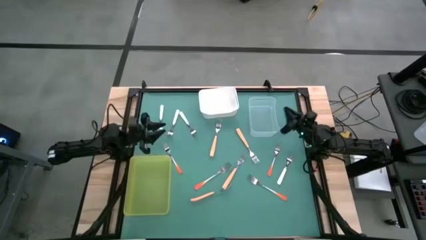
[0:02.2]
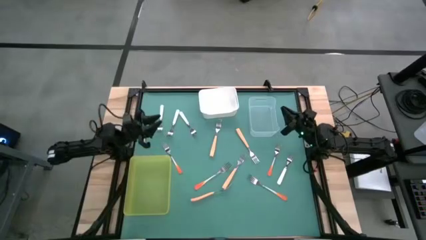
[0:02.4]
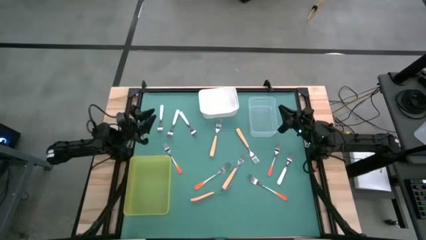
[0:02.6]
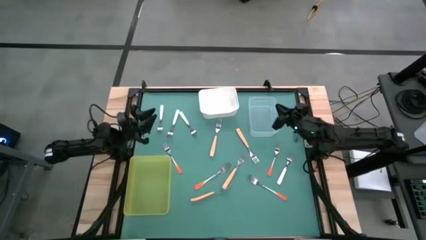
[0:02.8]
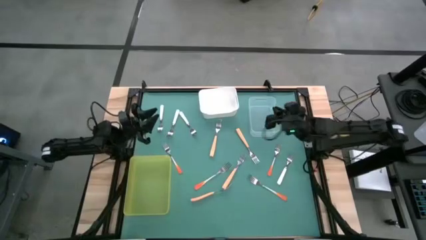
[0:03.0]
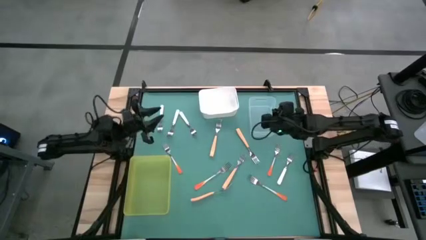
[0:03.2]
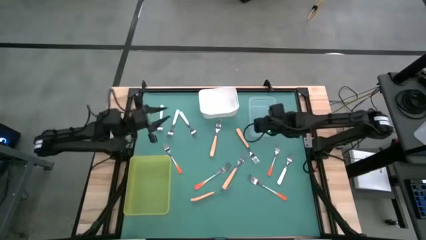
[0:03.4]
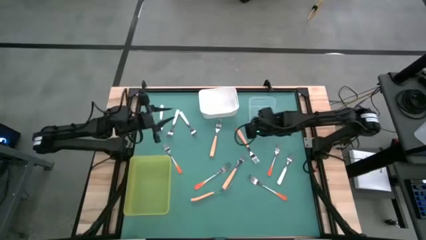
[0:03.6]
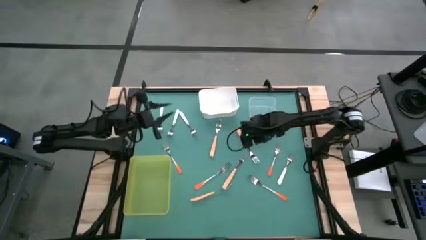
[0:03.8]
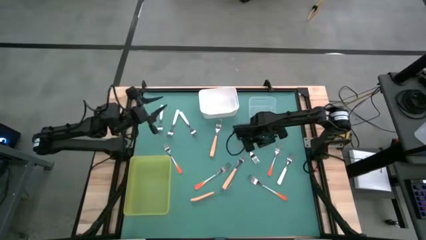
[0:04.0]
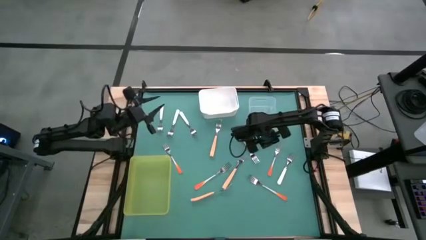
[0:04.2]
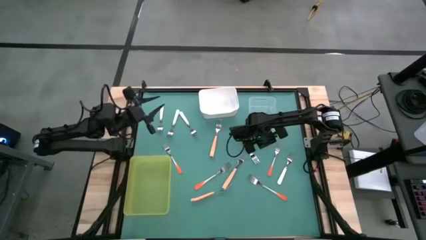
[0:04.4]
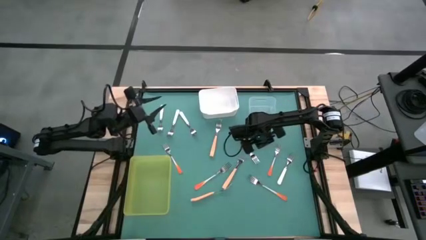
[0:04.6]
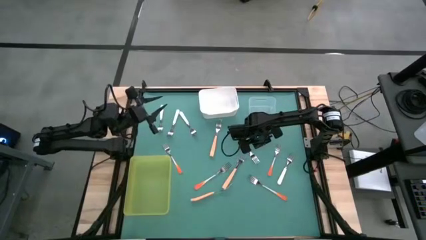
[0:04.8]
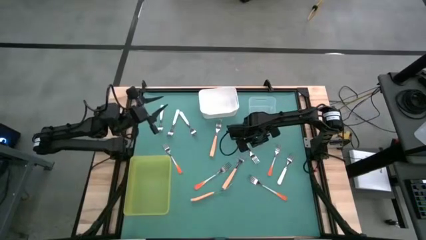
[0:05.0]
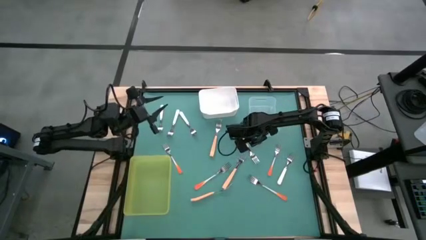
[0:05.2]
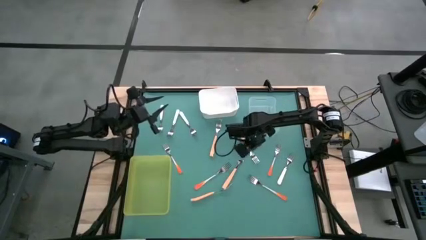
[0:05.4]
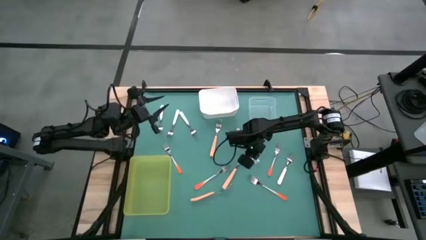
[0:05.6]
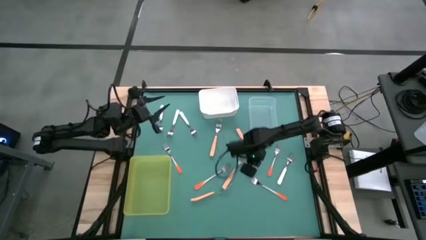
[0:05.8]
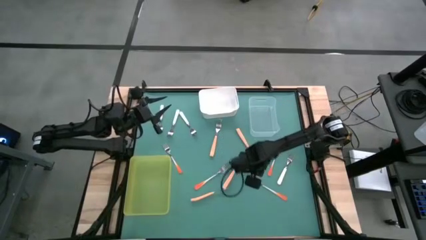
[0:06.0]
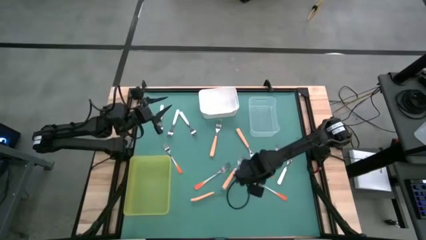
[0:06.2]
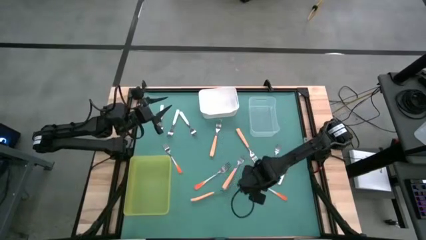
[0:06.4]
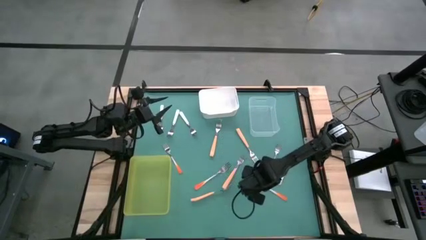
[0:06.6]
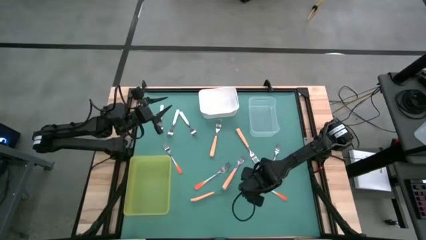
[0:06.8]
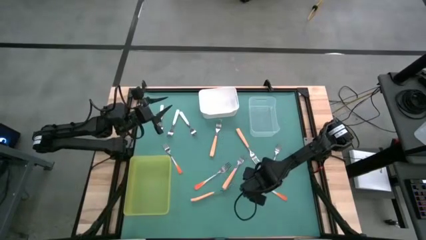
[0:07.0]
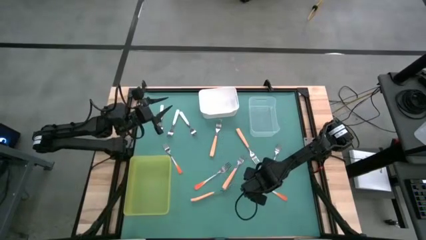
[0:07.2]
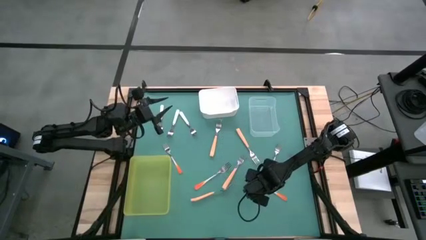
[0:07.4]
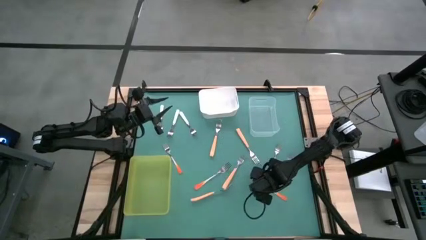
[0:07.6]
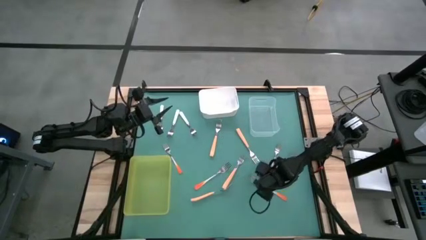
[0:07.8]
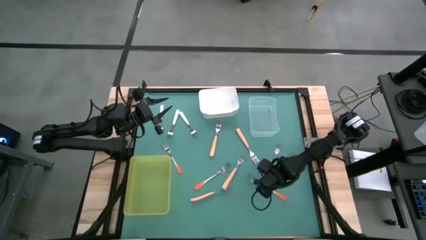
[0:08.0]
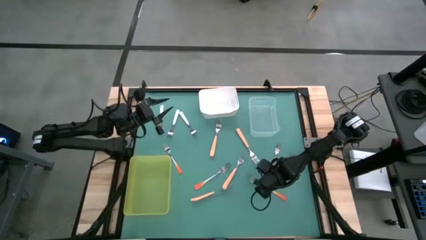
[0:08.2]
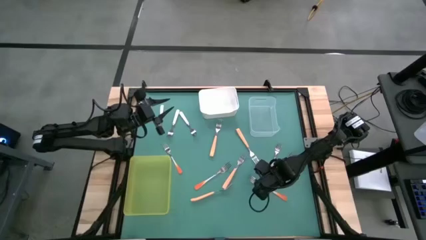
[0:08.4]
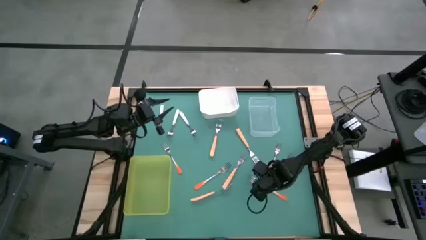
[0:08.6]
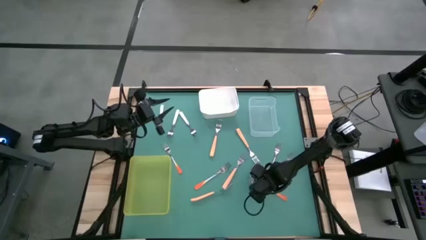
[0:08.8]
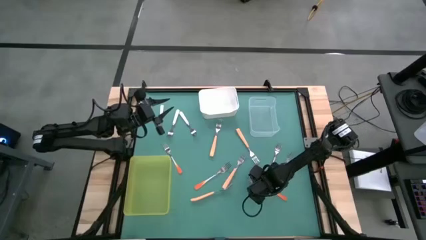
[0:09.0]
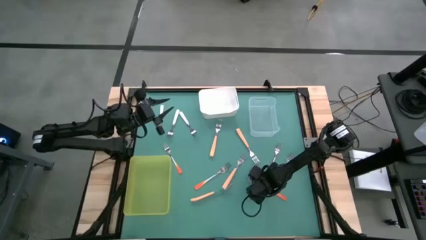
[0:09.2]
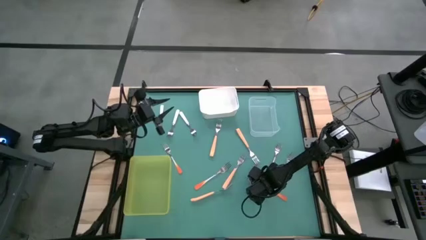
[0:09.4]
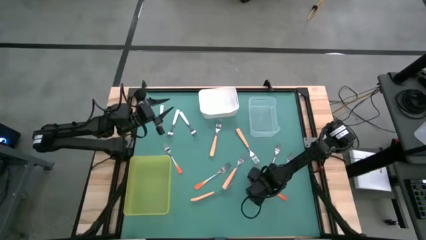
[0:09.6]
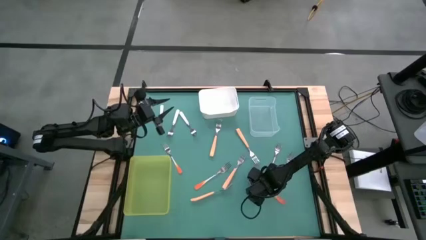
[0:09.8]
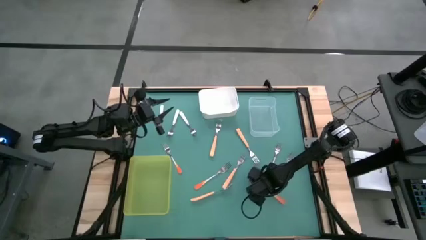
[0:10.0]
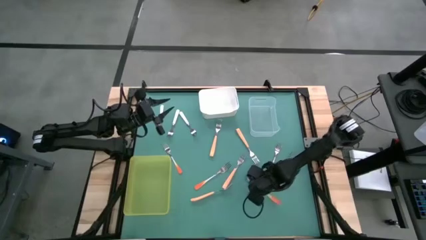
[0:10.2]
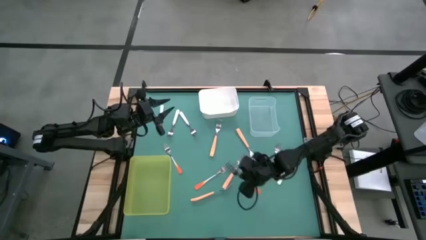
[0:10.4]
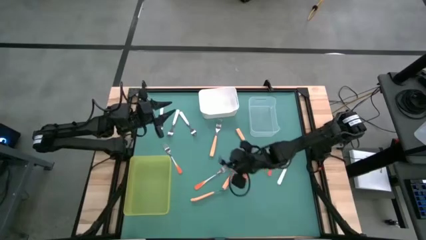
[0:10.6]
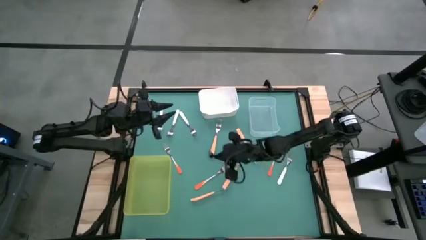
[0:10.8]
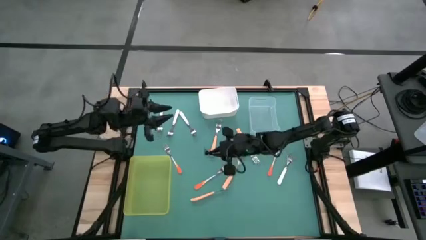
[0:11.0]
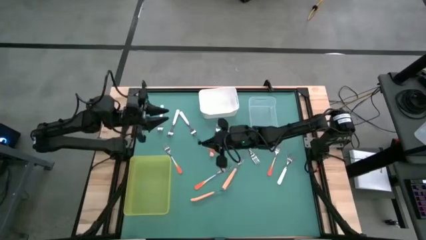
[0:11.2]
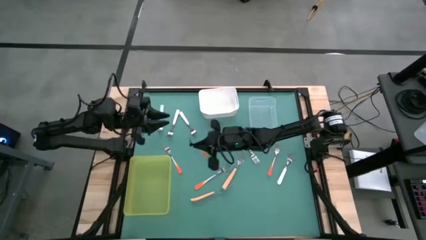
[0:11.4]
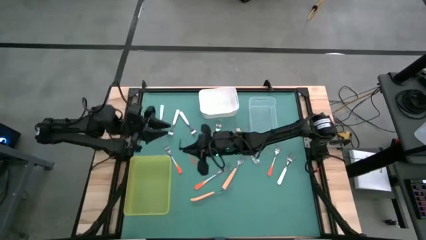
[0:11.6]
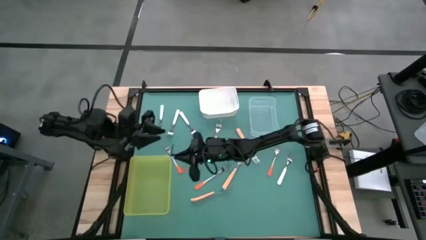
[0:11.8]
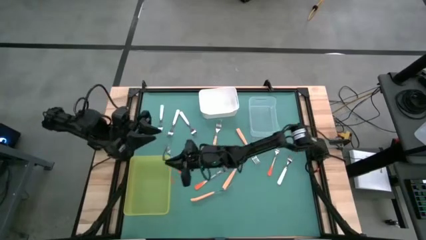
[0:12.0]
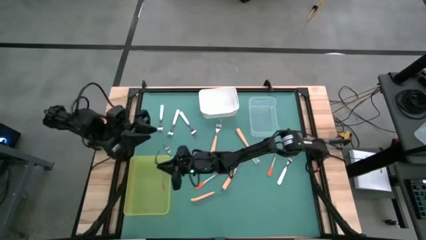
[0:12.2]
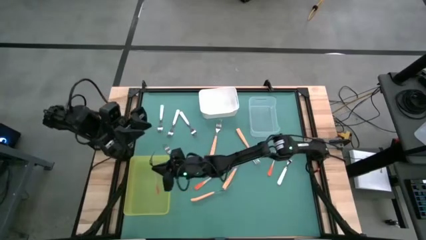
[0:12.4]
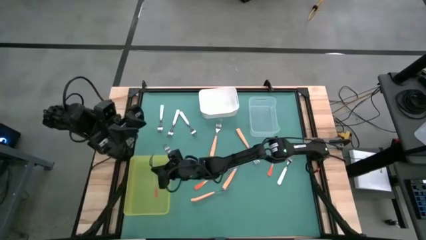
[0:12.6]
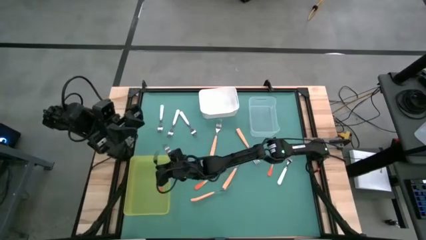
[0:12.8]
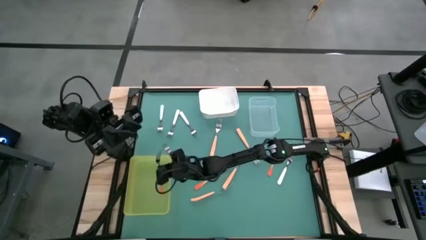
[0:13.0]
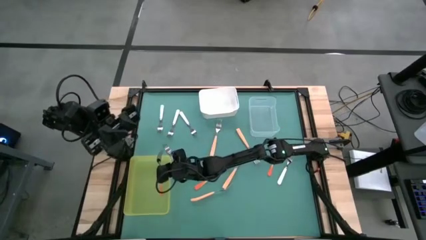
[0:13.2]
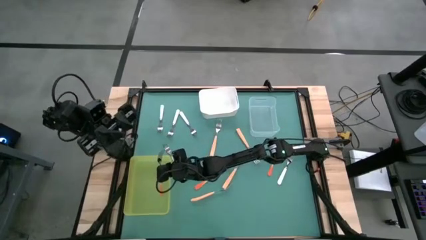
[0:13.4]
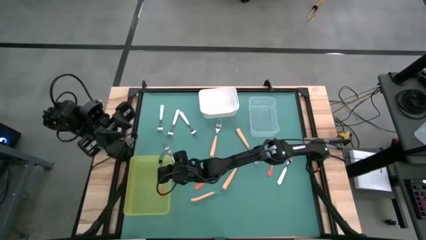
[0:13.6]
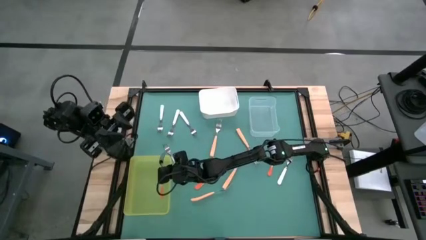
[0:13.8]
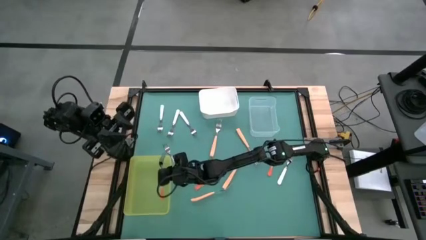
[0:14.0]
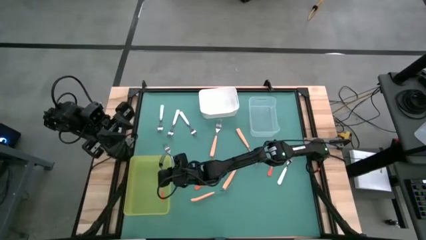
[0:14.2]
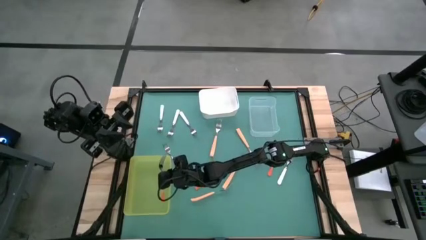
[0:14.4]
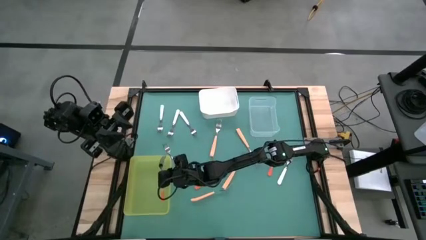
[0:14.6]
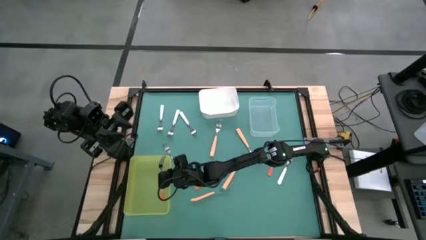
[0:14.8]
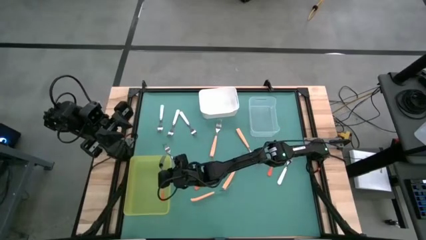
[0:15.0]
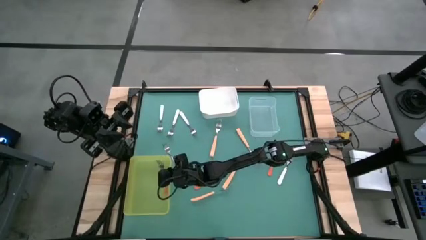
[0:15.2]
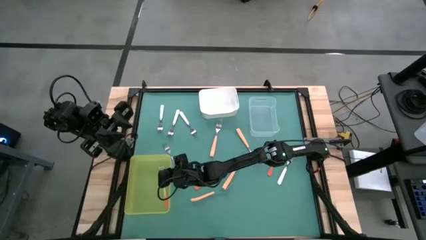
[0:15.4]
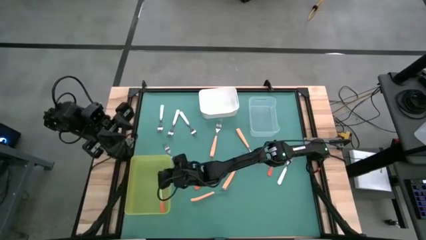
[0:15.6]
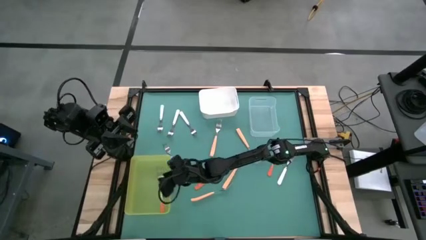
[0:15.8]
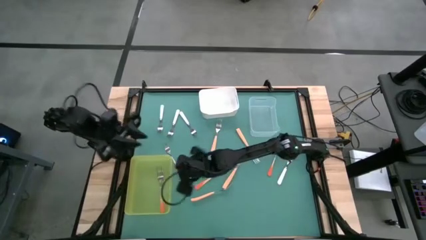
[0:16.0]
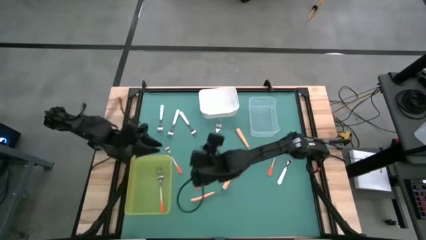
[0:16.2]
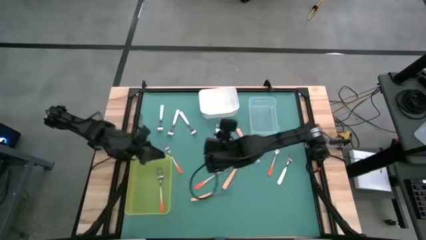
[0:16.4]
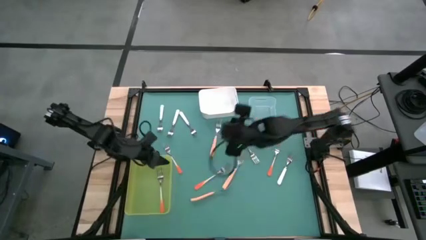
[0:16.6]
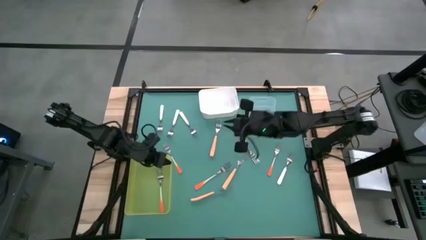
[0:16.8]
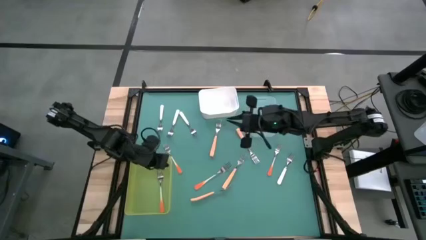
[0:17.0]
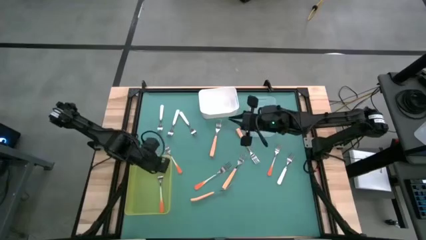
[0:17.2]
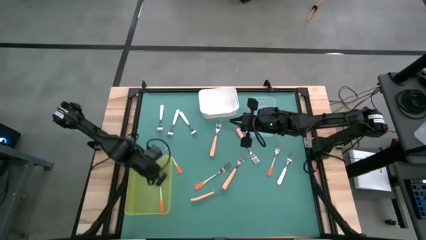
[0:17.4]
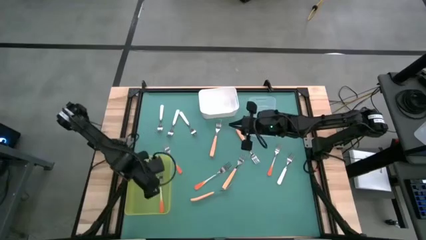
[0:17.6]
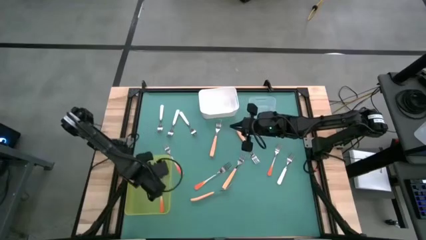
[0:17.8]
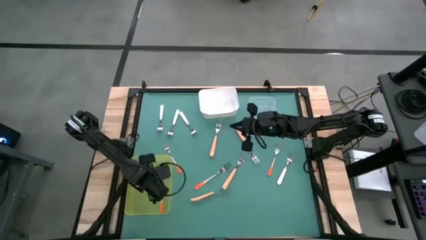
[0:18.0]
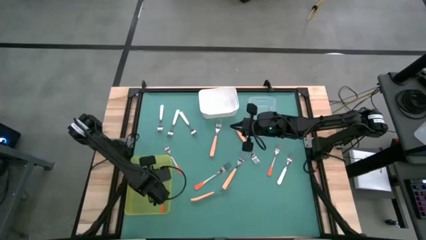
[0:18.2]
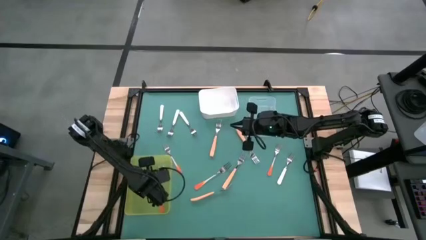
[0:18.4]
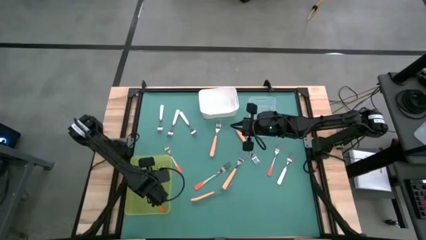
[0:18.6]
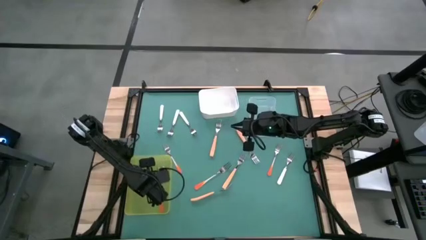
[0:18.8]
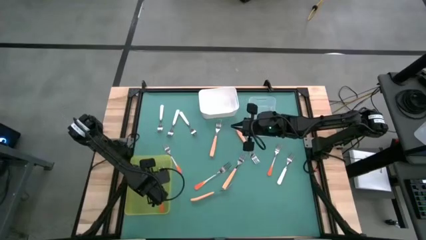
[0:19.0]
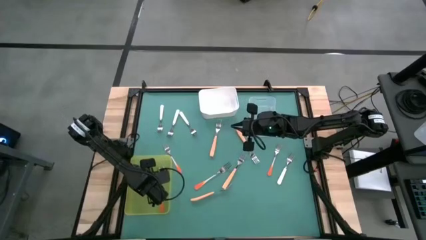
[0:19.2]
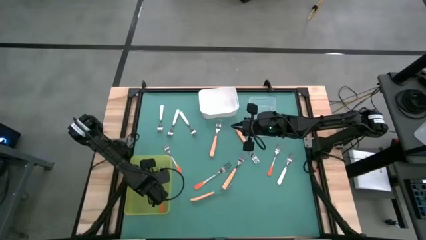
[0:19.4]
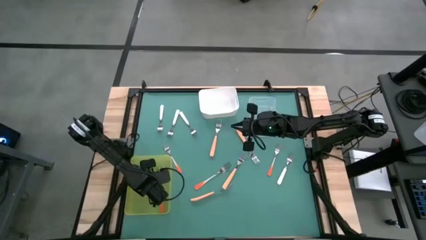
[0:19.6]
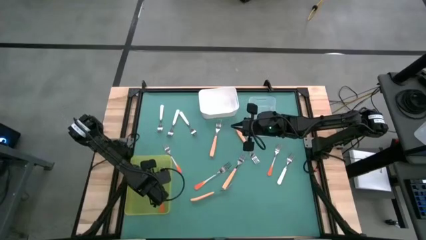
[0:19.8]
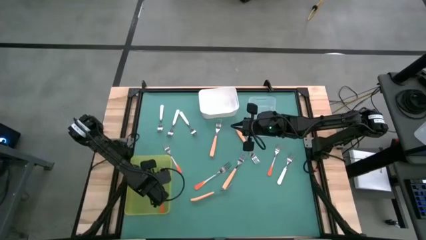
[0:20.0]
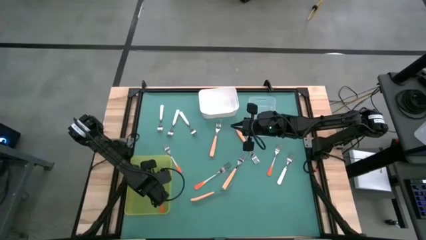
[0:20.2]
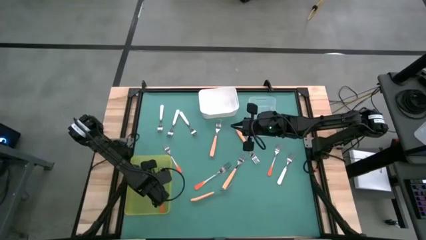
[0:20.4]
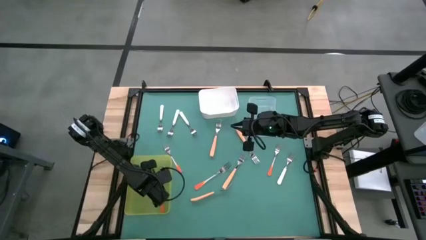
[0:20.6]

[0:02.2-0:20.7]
Task: Sort silverware by color (type)
Put the orange fork into the yellow bin
